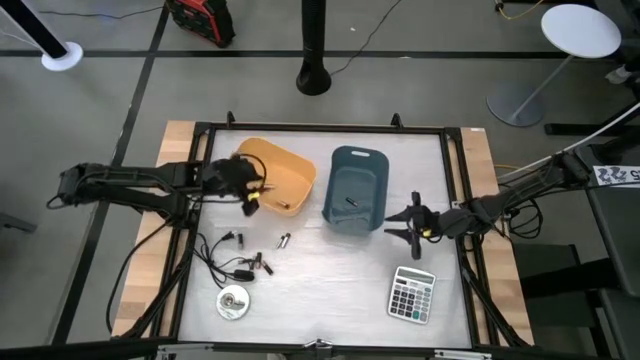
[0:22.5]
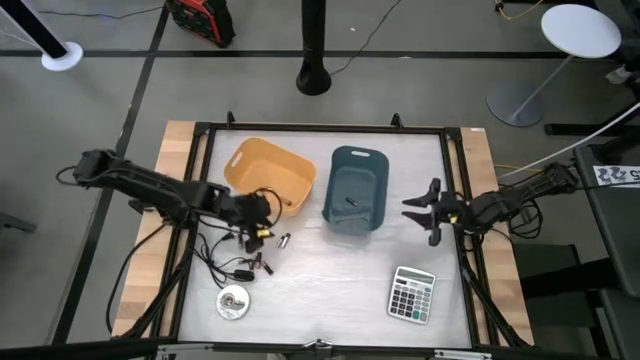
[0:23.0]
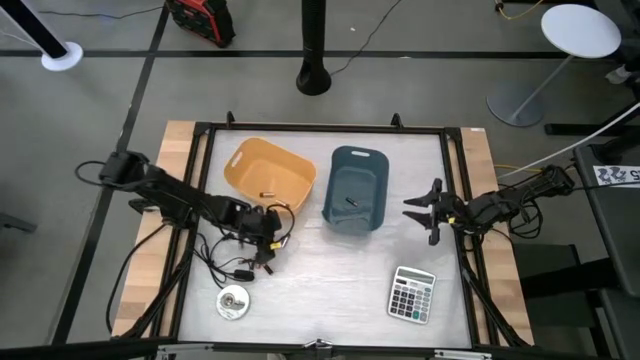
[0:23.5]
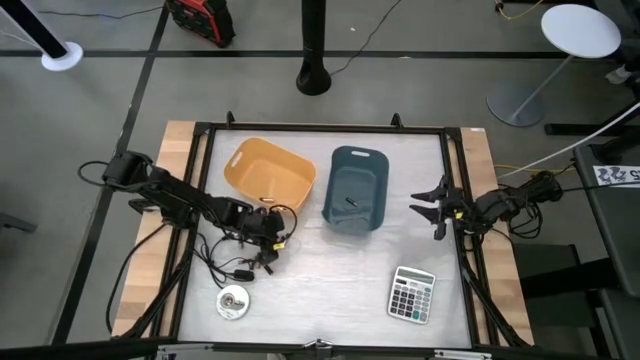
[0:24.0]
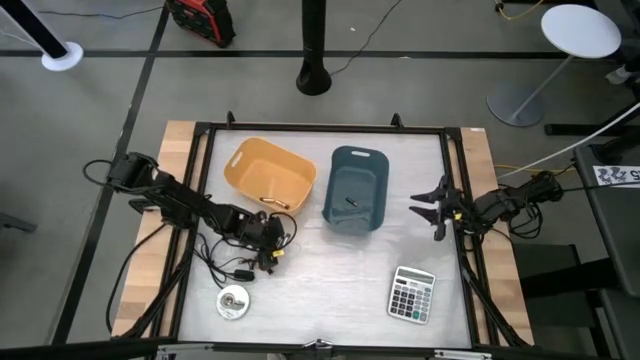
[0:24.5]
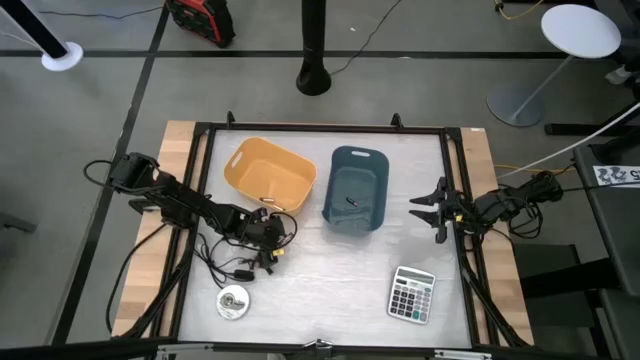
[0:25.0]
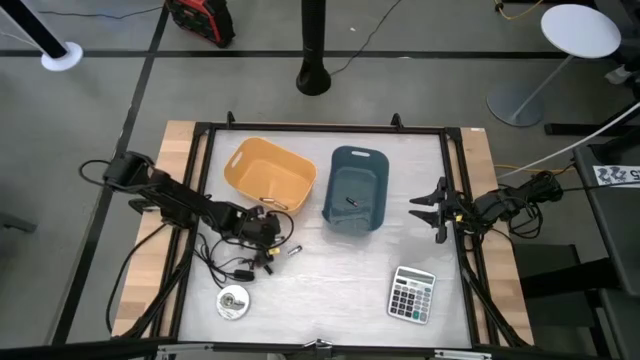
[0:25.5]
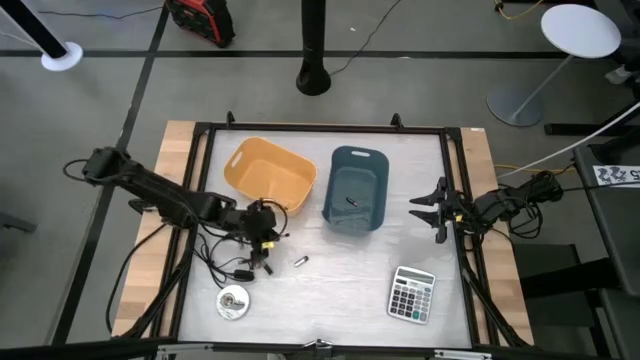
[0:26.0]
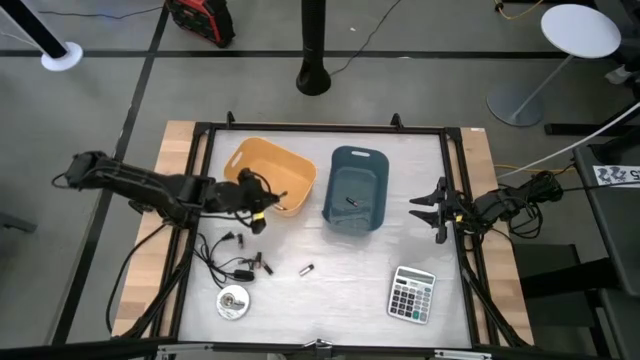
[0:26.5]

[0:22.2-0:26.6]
Task: Sort batteries
Put the silver battery into the blue bin

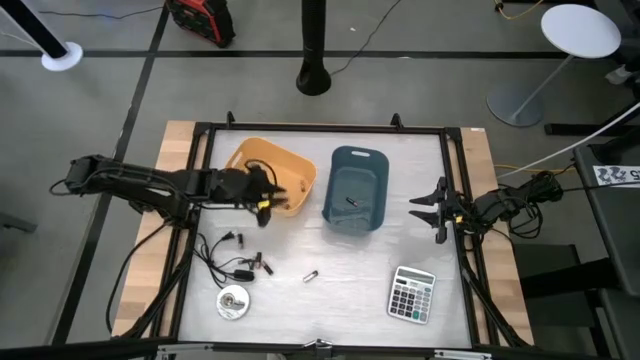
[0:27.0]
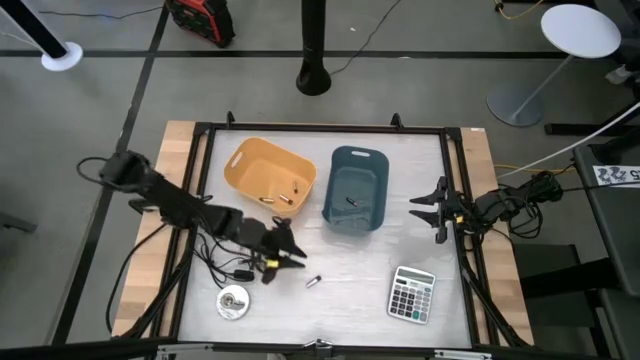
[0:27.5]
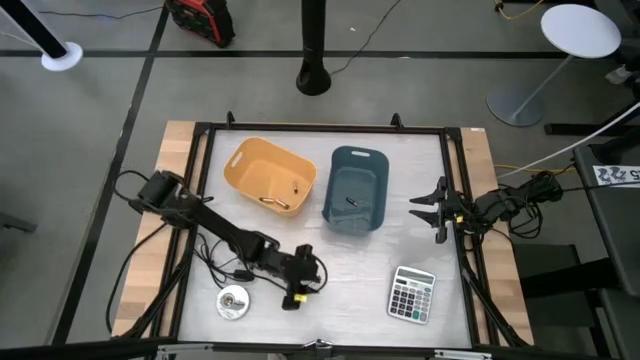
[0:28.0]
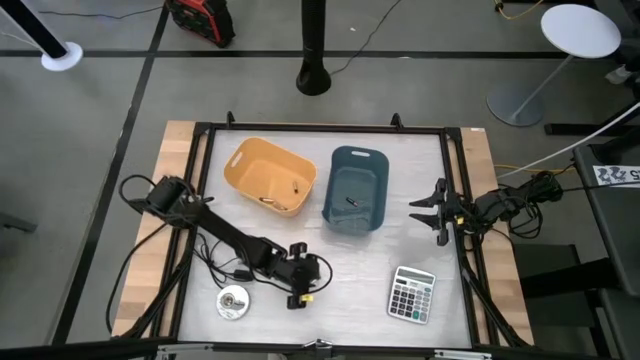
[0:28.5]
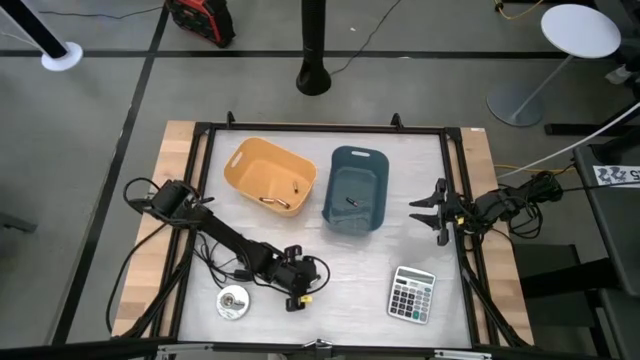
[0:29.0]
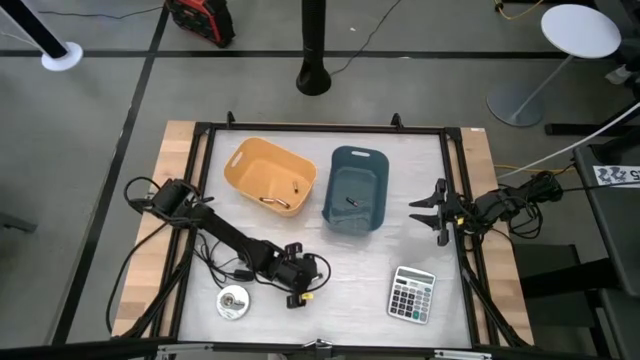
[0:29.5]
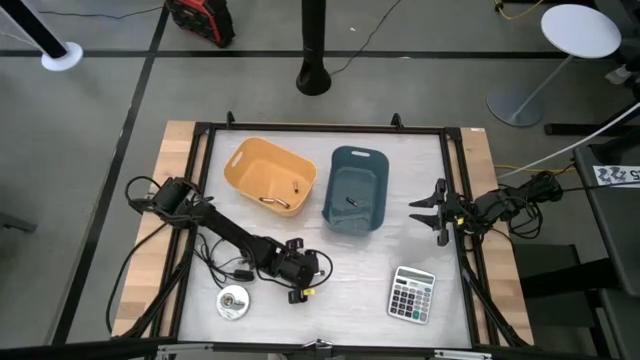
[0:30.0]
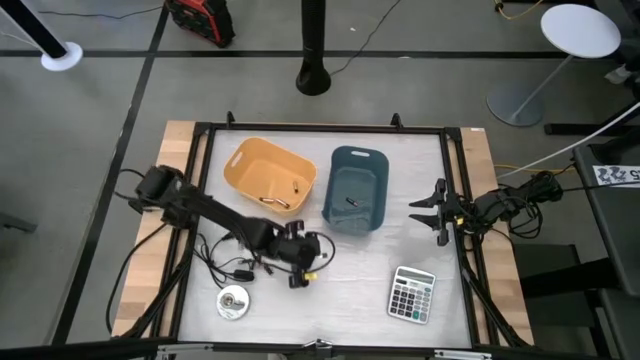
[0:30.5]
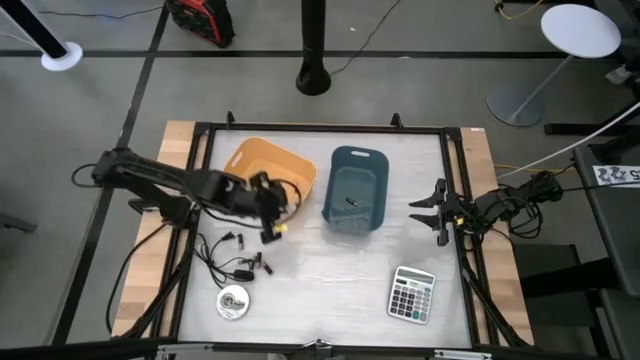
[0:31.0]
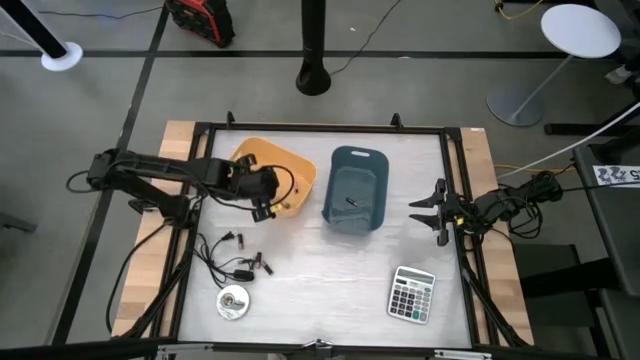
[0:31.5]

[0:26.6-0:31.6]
Put the silver battery into the yellow bin

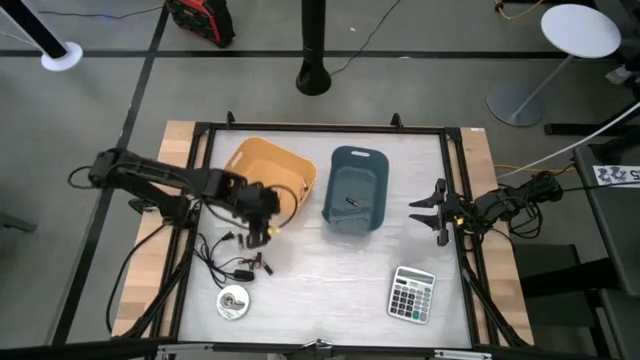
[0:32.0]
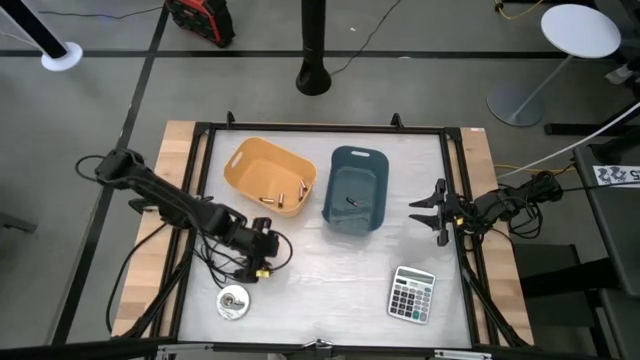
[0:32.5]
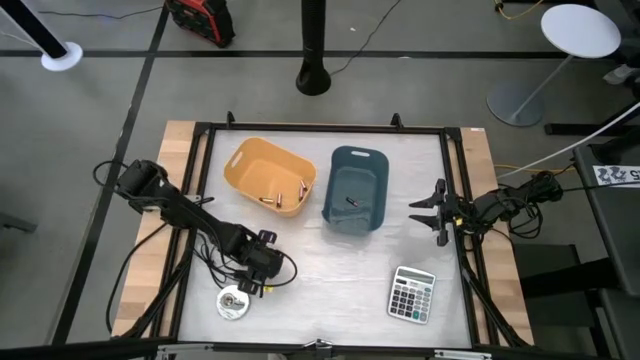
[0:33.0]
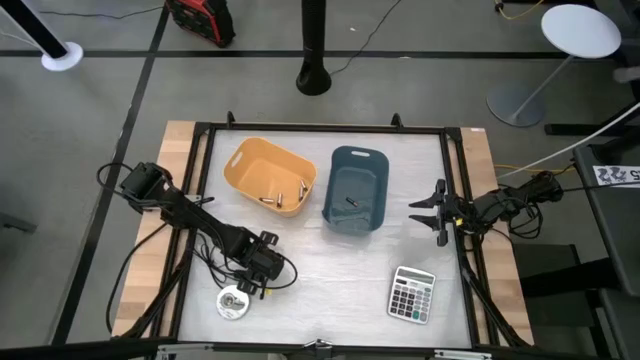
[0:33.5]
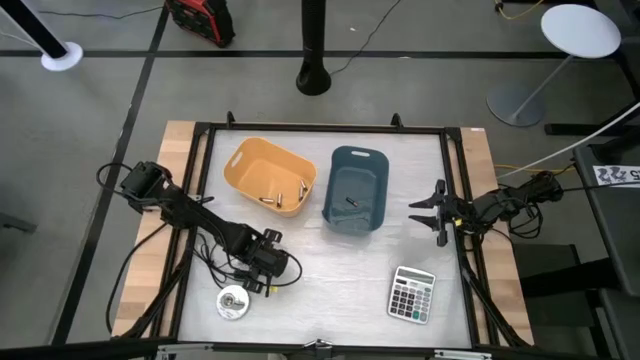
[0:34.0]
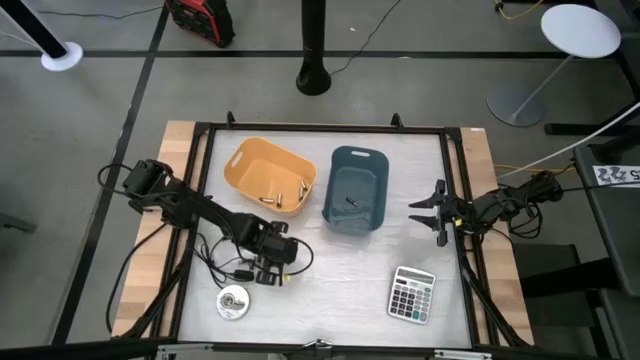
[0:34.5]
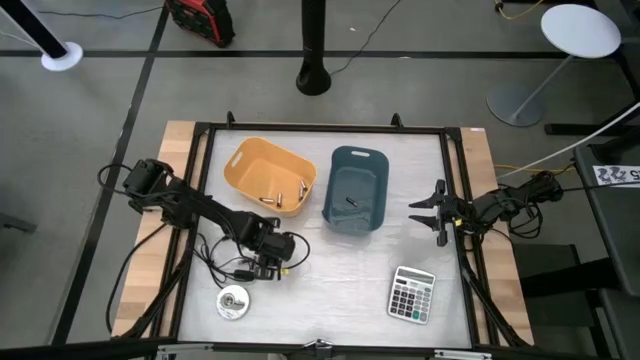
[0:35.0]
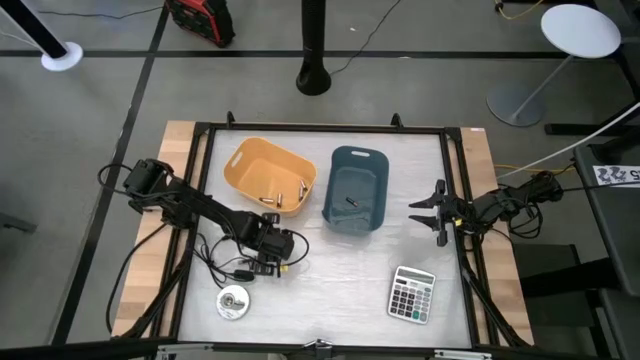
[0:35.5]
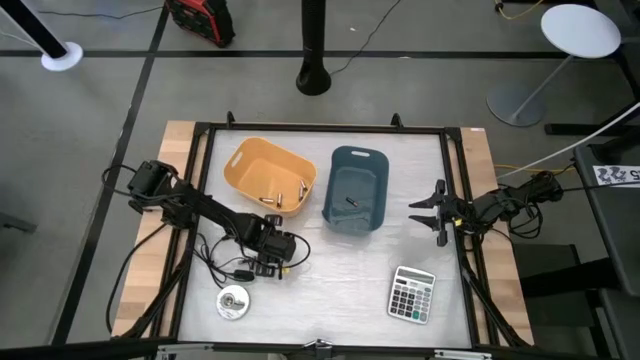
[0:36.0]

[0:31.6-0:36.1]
Put the black battery into the blue bin

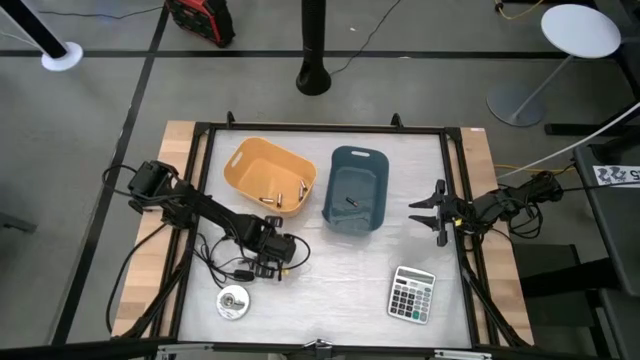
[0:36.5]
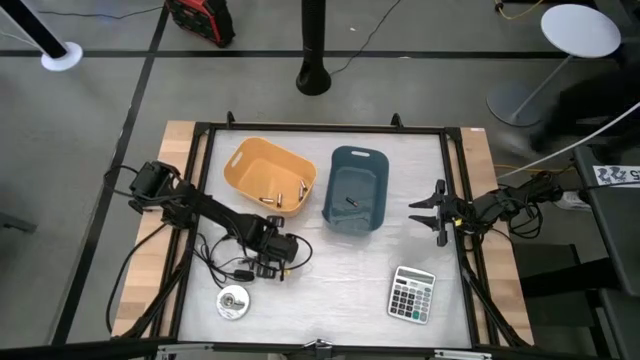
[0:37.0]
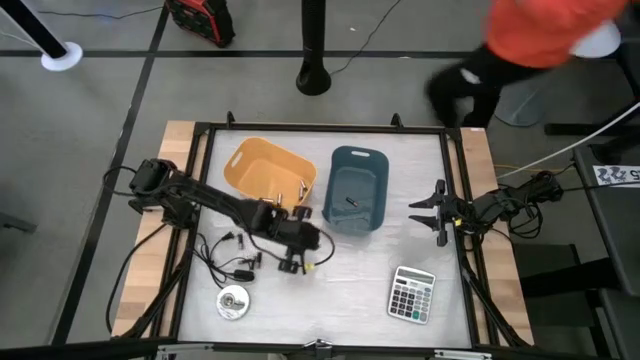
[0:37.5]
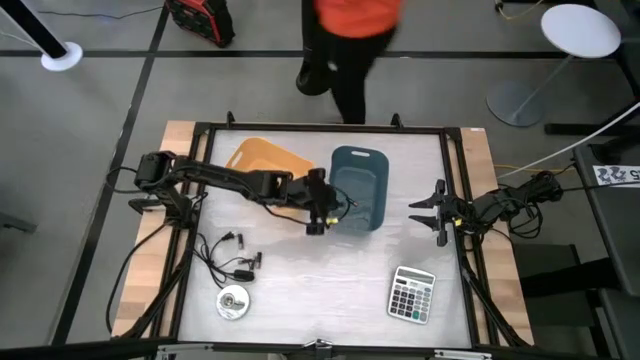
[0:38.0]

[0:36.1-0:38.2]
Put the black battery into the blue bin

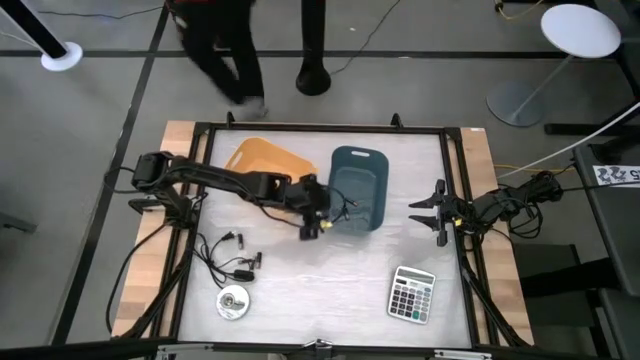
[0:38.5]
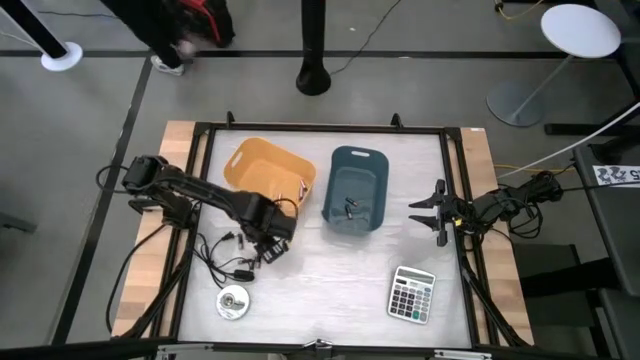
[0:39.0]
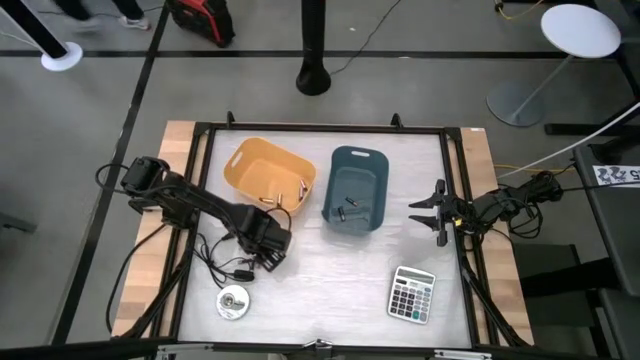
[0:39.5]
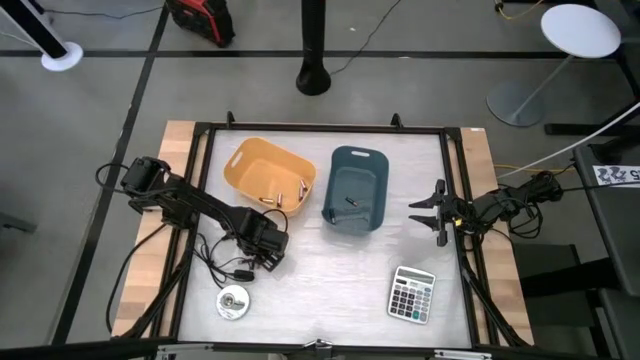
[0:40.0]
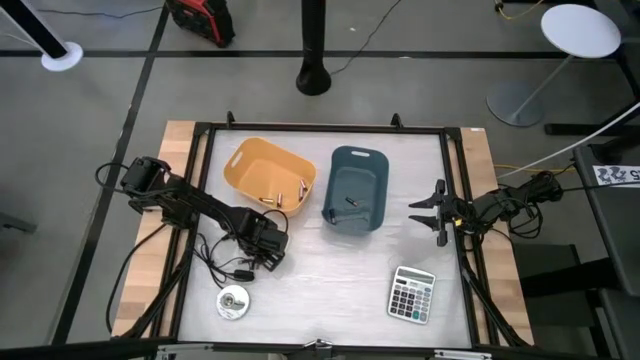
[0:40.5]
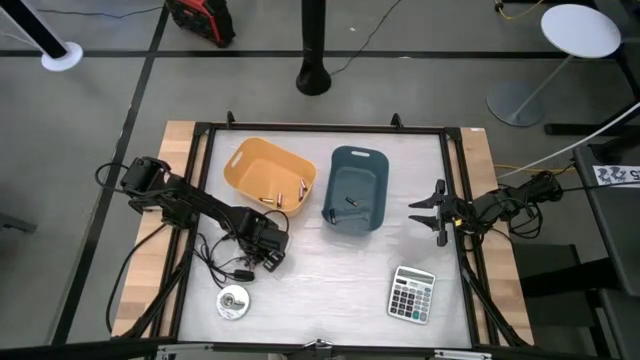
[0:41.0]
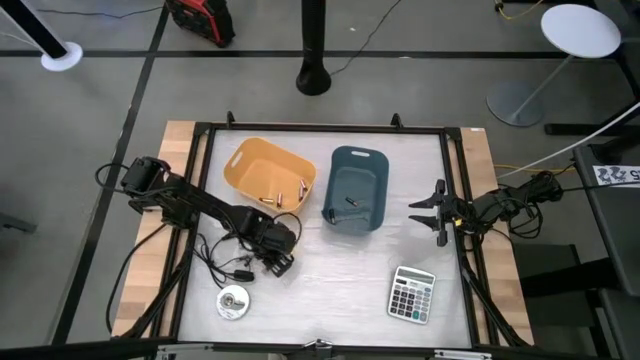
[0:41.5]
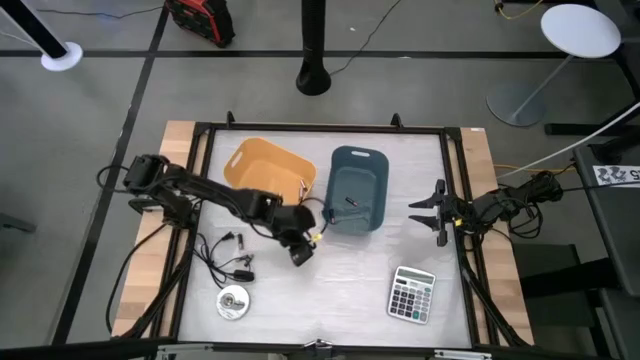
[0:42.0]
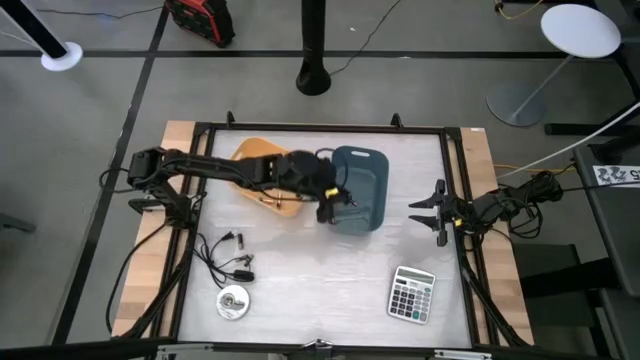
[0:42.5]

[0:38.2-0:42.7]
Put the black battery into the blue bin
